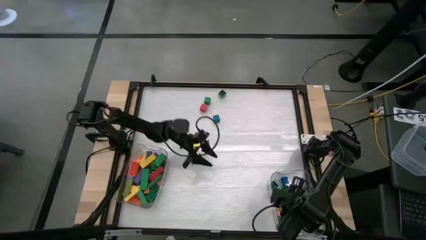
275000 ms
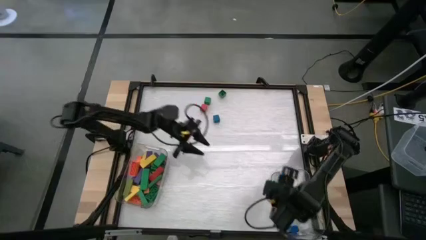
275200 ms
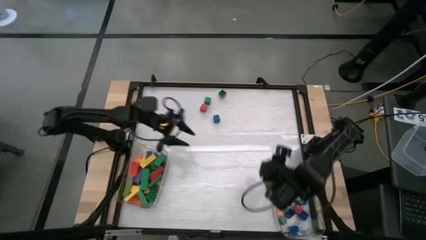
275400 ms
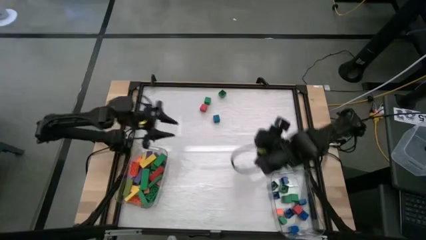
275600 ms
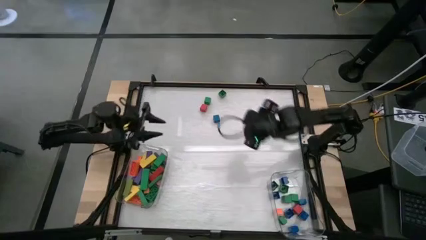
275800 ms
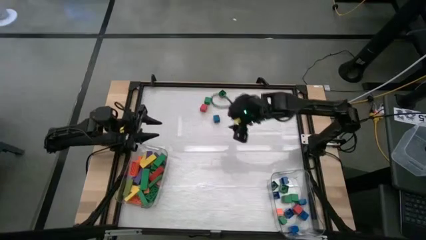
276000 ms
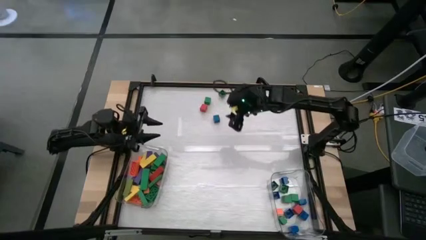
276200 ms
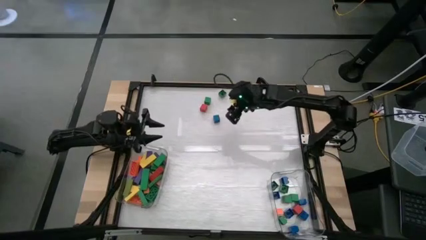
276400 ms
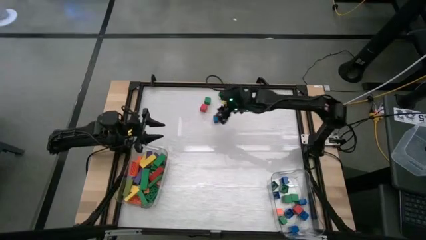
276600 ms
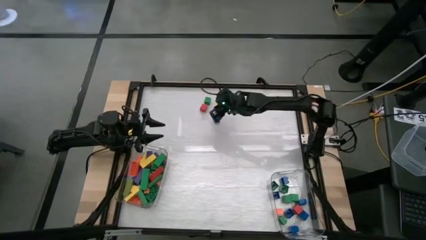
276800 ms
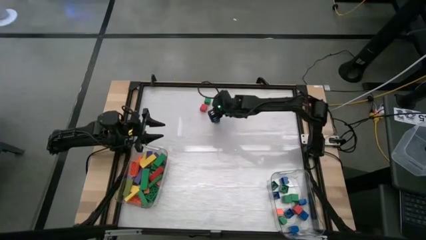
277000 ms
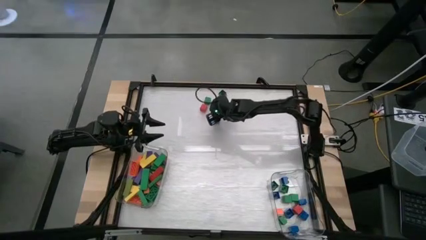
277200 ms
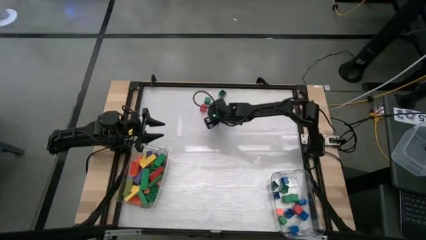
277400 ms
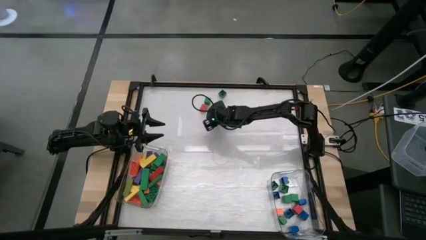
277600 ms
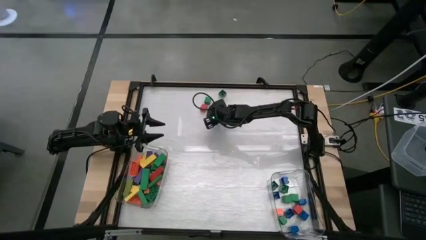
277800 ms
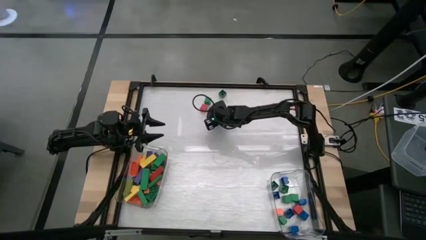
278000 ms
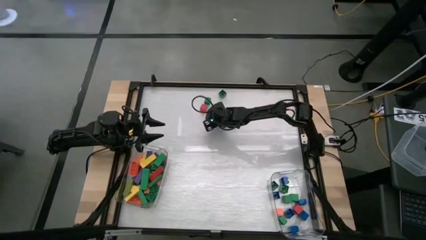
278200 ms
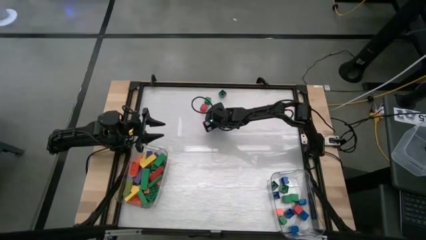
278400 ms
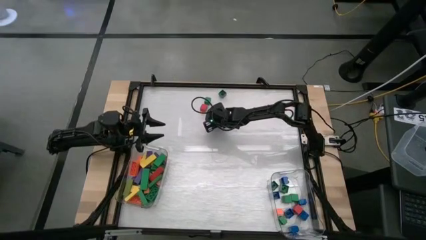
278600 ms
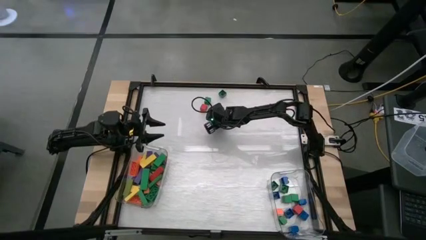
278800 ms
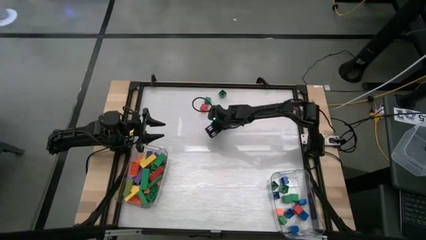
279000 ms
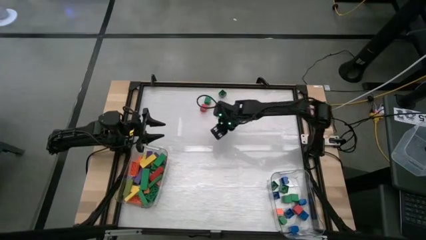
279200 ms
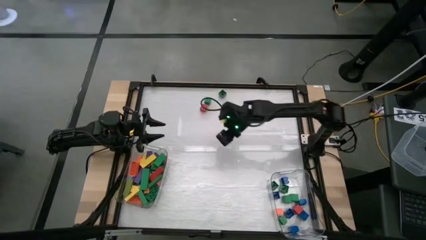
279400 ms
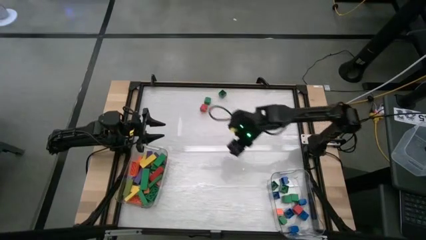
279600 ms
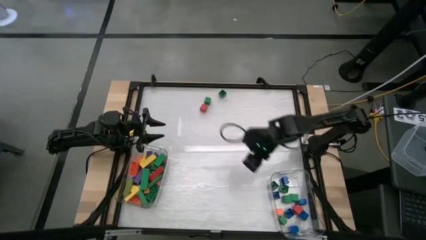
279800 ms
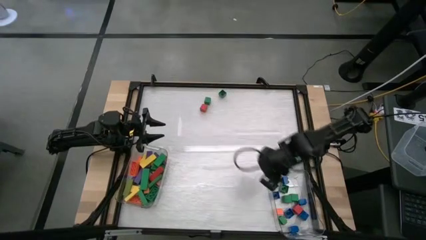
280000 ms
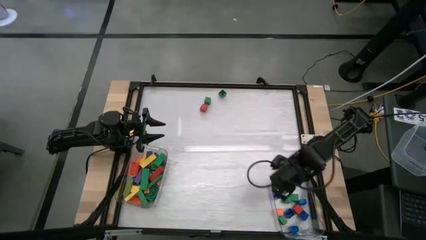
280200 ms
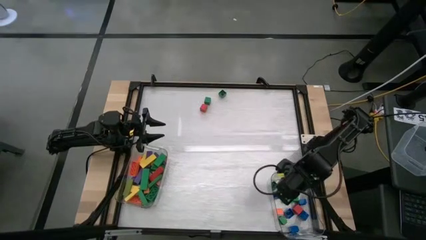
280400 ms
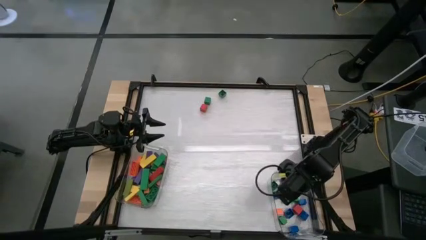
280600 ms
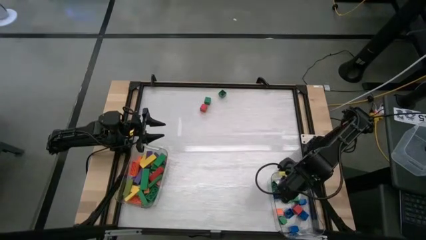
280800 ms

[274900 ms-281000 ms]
Task: Sort blocks by size
Put the small blue wooden block into the right transparent bin

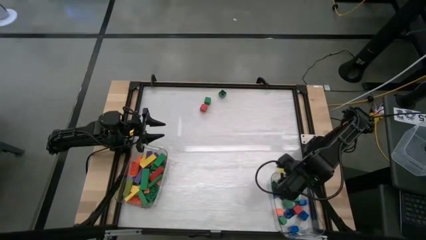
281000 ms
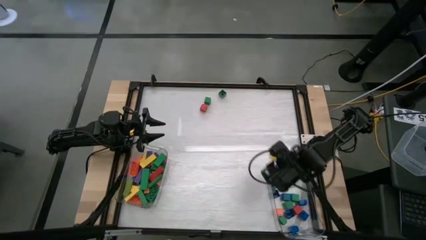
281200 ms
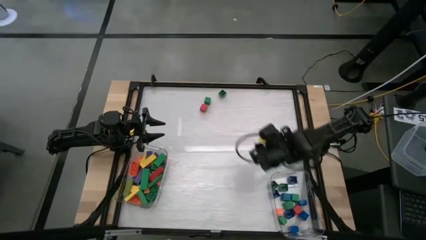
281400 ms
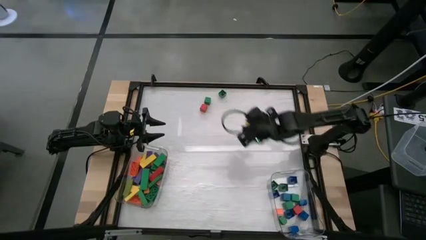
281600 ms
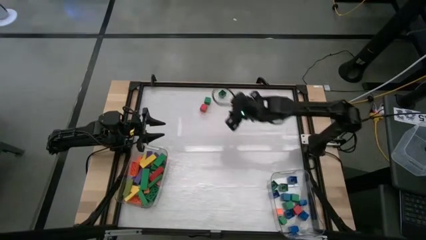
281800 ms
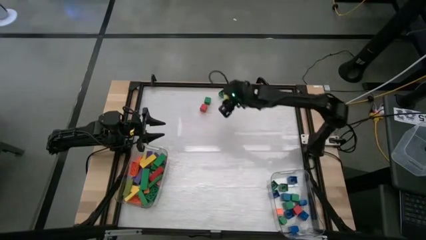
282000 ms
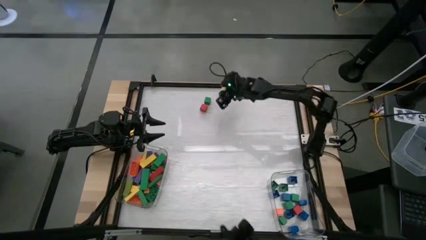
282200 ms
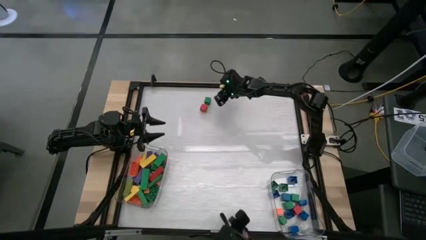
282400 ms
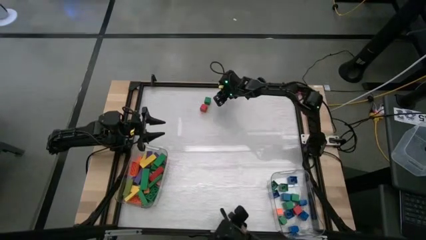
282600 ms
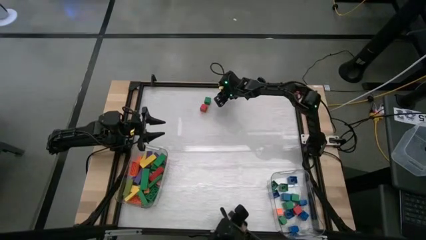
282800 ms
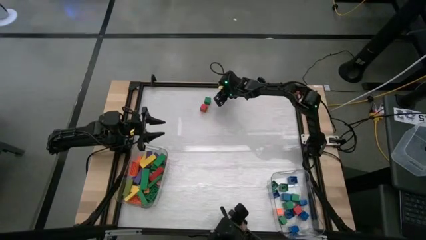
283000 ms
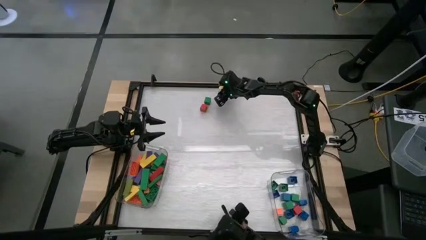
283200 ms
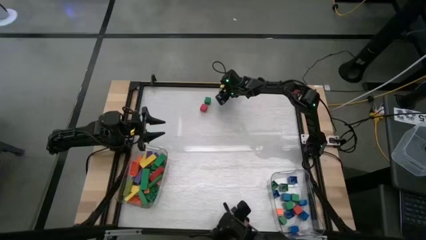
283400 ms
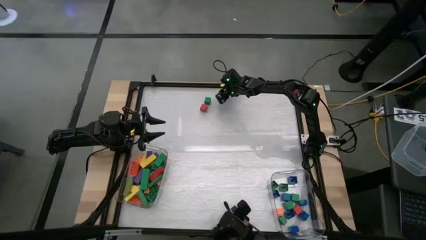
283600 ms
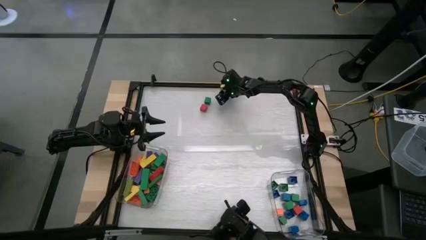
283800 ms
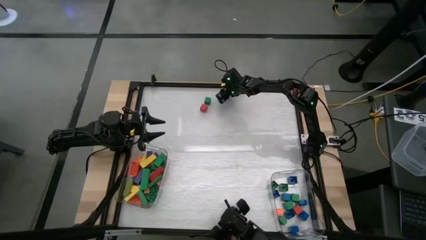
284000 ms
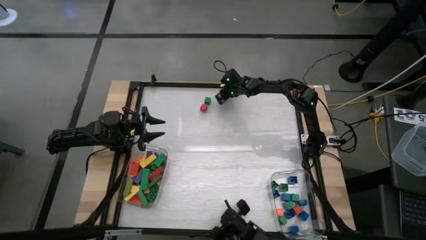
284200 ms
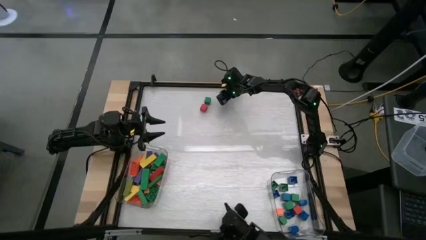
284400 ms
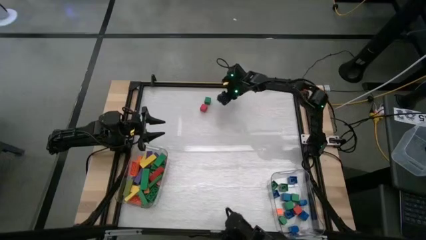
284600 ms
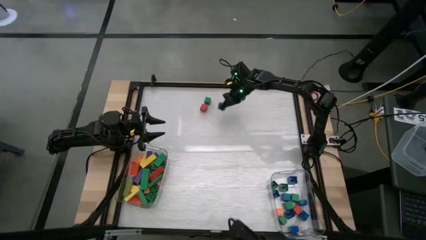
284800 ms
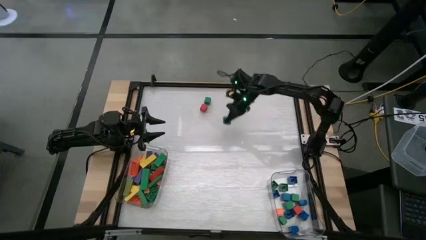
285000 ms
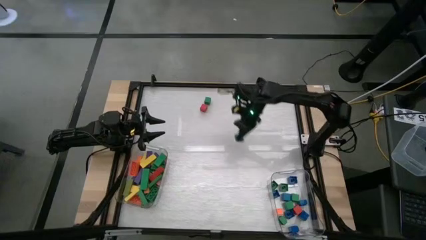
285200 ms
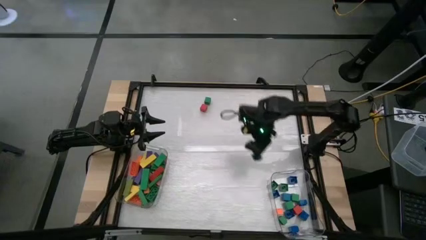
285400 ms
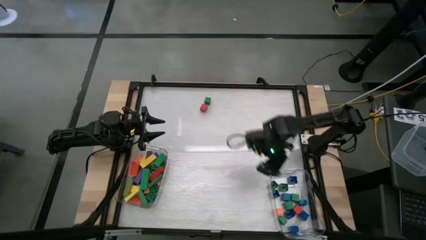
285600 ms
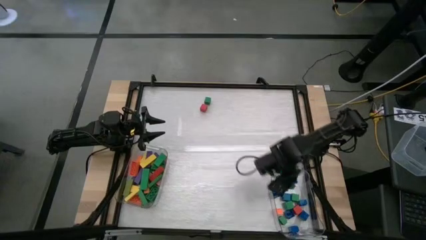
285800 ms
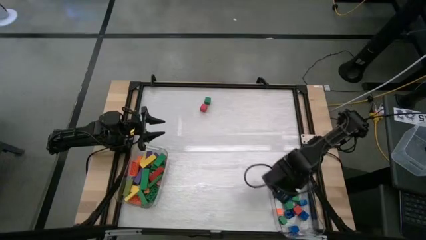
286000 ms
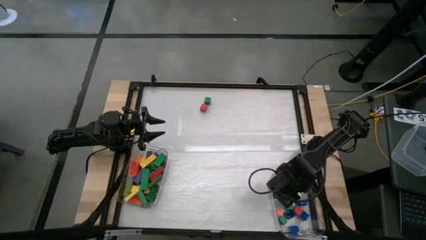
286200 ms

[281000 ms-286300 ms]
Put the small green game piece into the right transparent bin

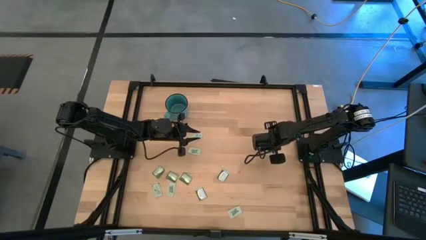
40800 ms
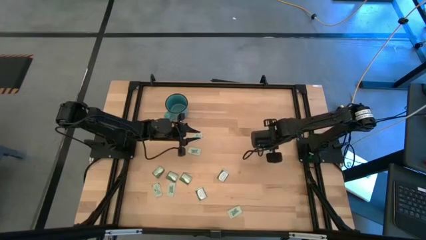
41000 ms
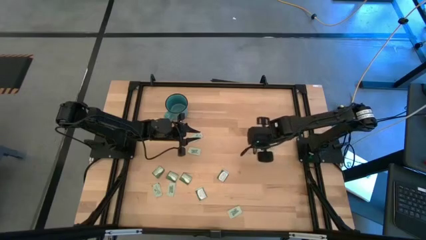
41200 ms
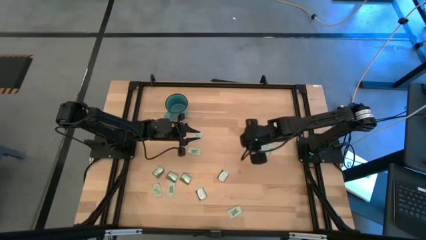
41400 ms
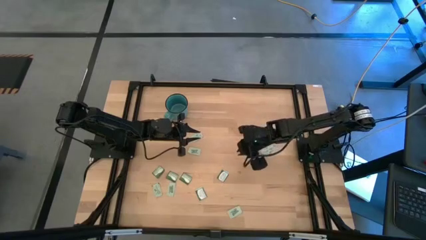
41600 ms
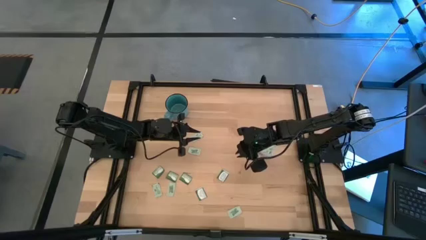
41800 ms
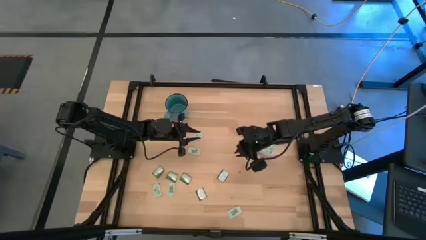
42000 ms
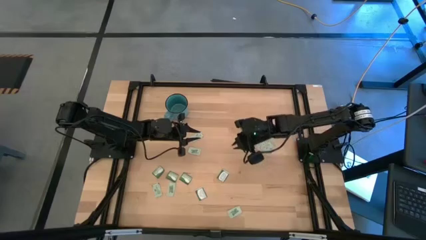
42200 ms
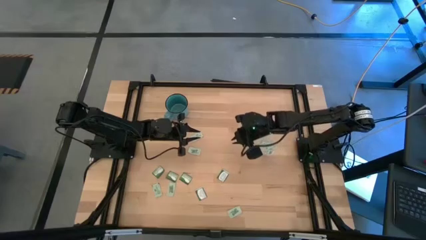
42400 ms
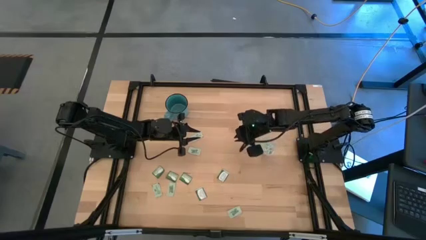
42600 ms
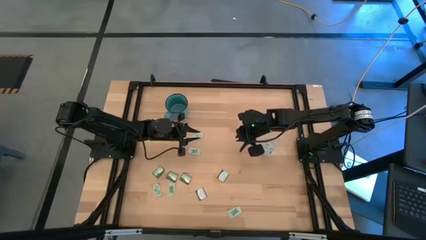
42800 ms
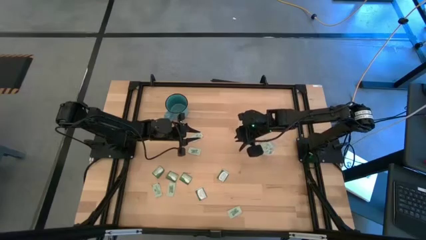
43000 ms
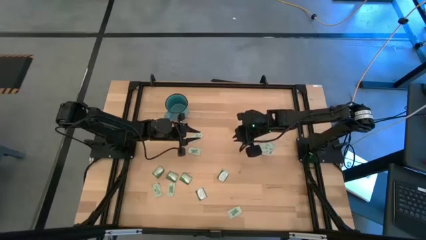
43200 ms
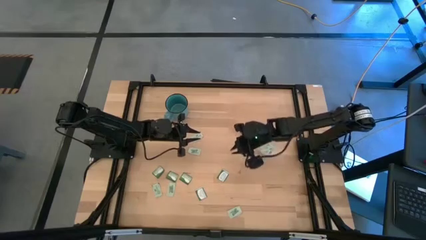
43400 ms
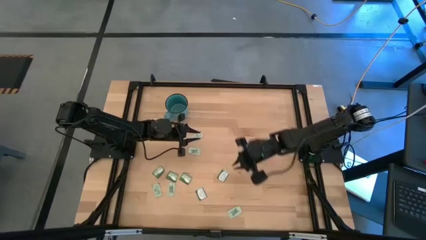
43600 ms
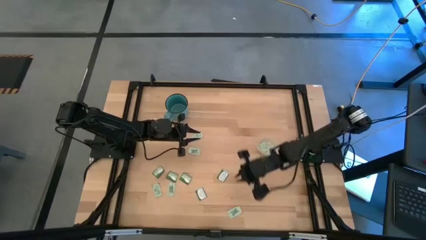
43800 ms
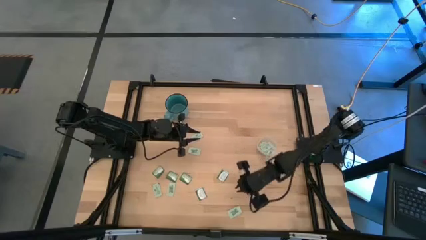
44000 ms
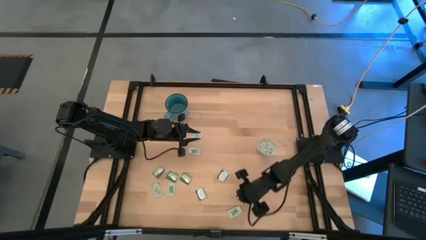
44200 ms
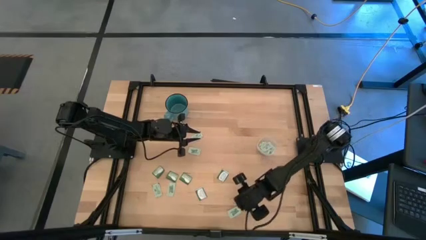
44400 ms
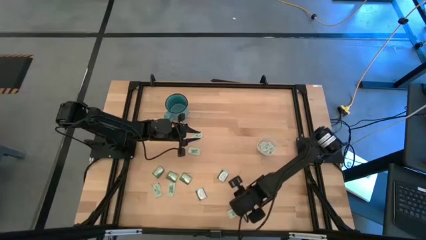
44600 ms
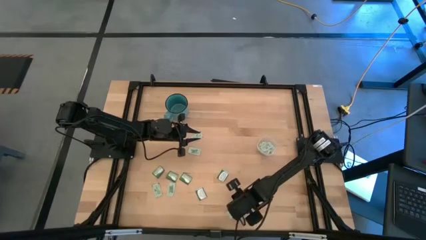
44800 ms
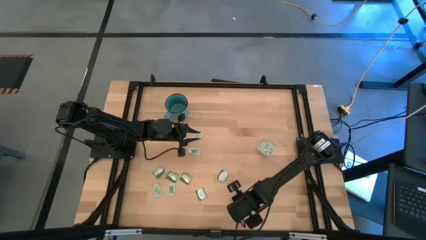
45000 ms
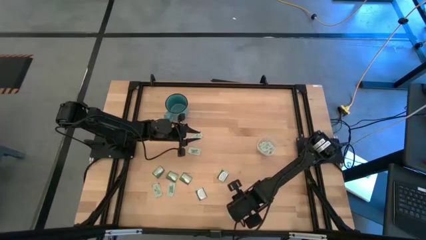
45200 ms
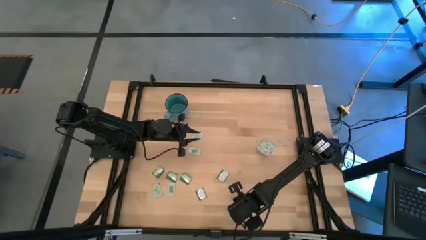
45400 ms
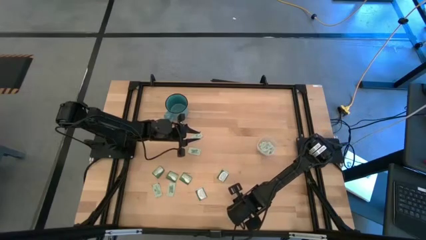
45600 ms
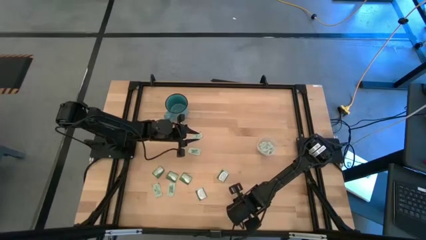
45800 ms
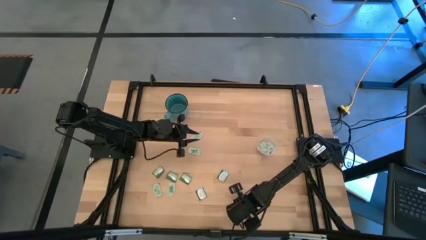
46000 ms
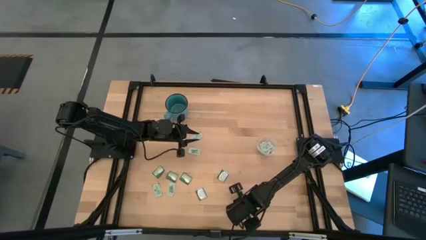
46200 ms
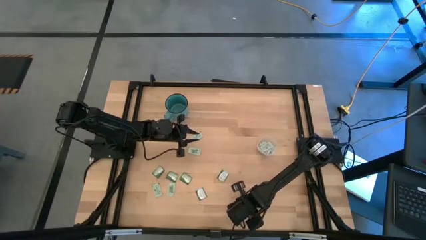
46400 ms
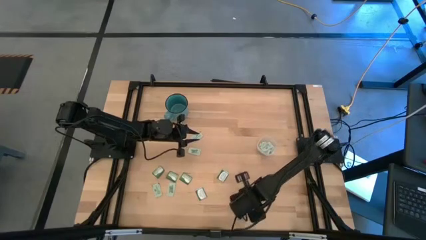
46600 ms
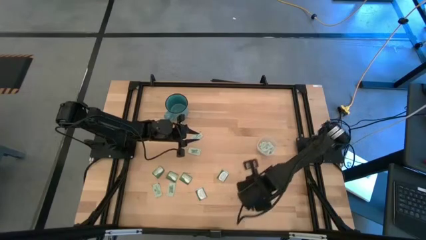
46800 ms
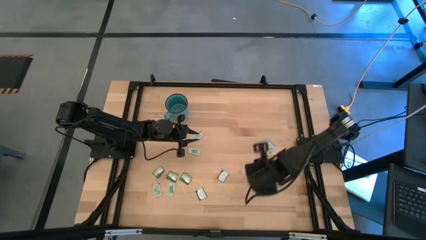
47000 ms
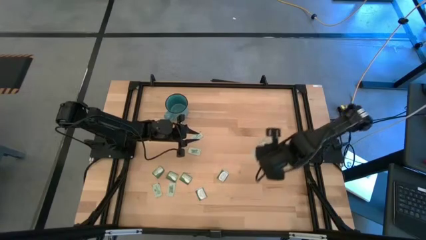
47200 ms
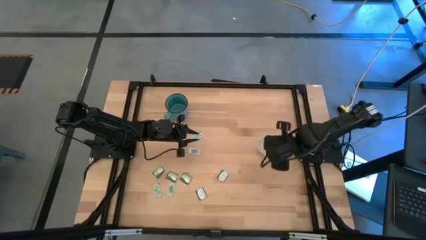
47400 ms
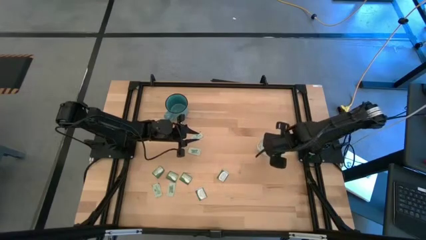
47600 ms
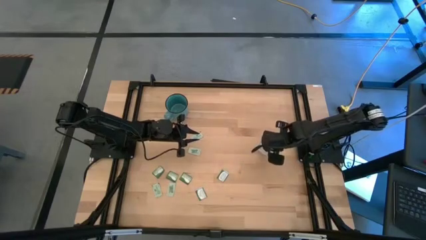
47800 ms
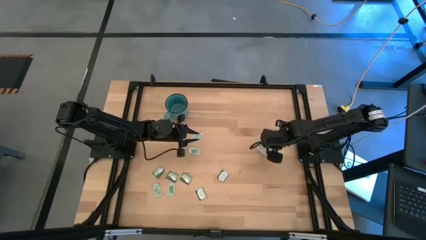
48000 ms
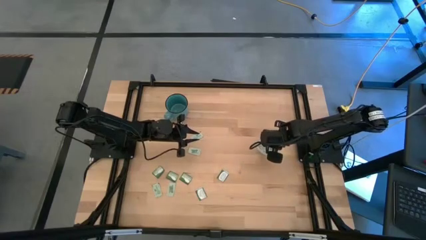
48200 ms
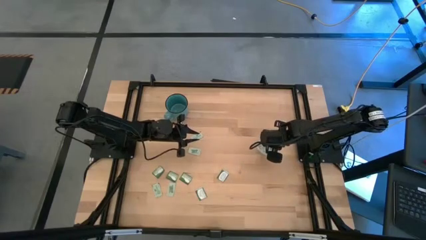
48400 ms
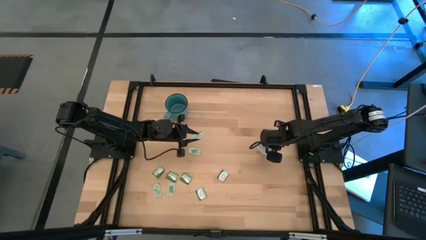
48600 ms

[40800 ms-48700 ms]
Task: Pick and place Stevia / Truvia into bins
Put the stevia packet into the transparent bin
